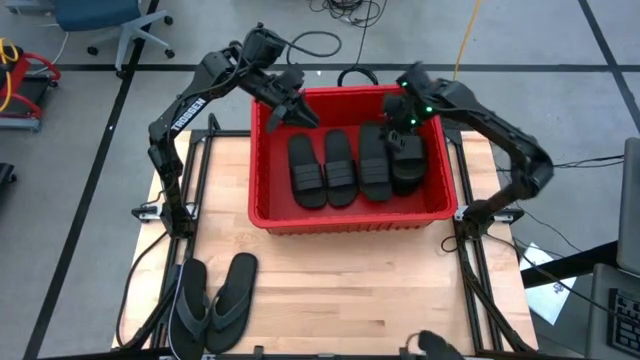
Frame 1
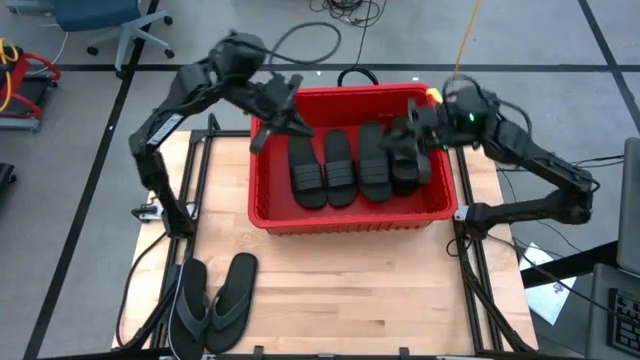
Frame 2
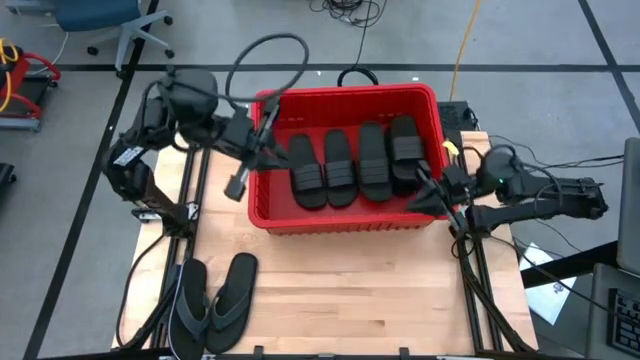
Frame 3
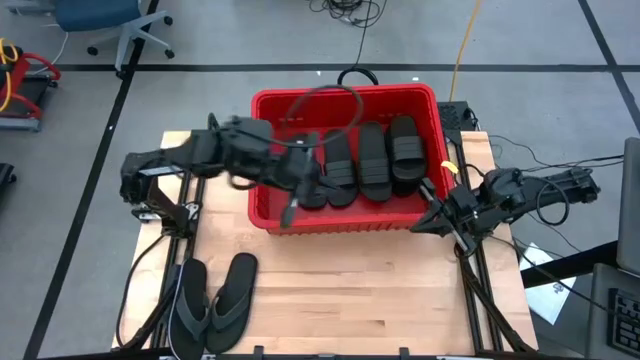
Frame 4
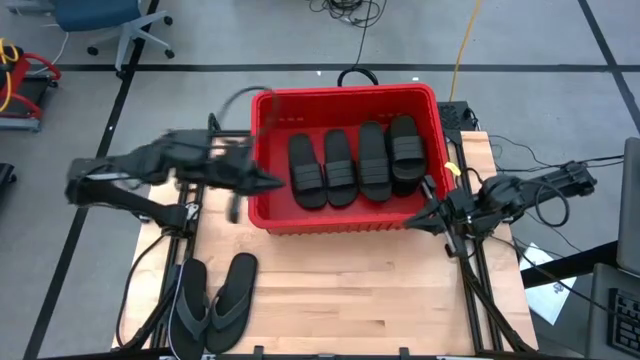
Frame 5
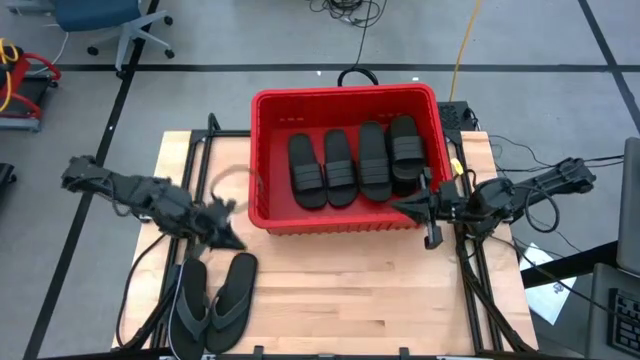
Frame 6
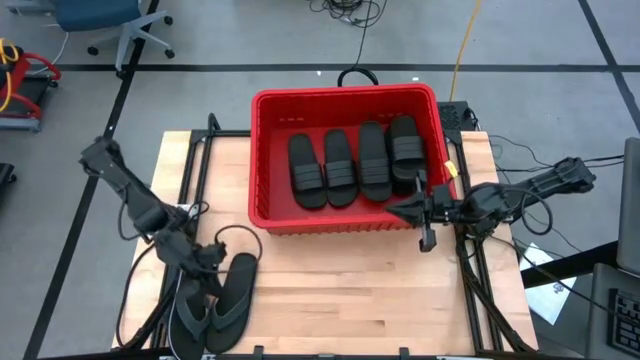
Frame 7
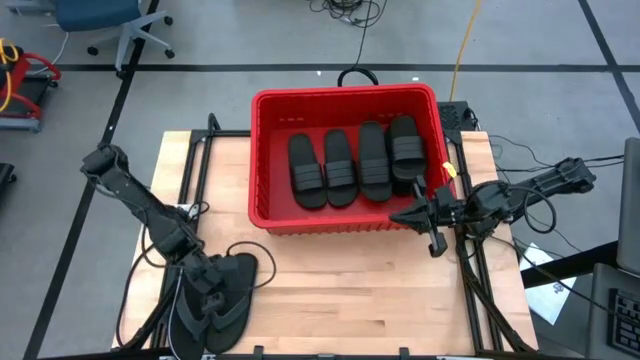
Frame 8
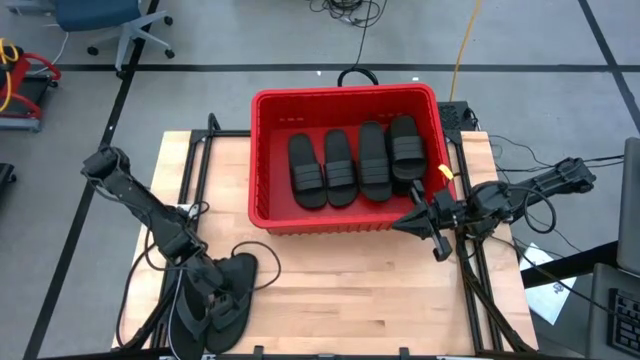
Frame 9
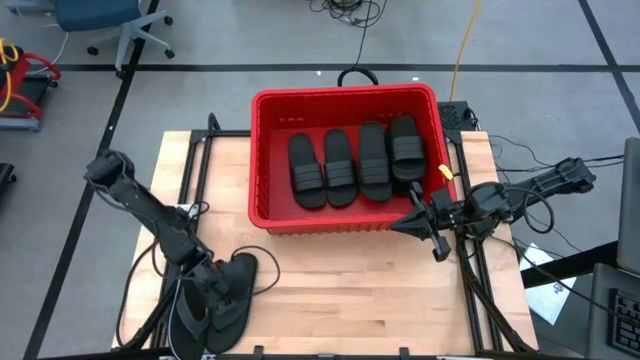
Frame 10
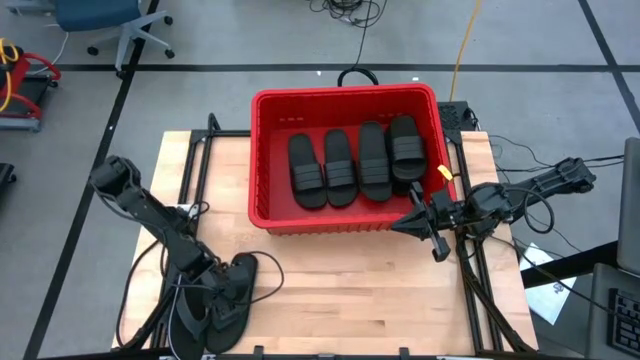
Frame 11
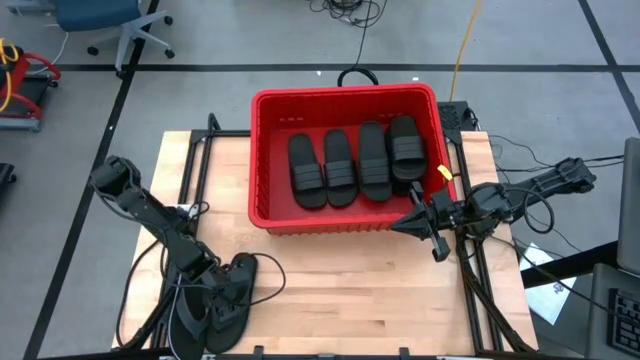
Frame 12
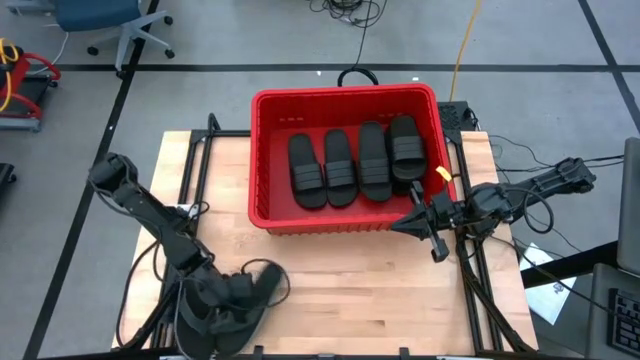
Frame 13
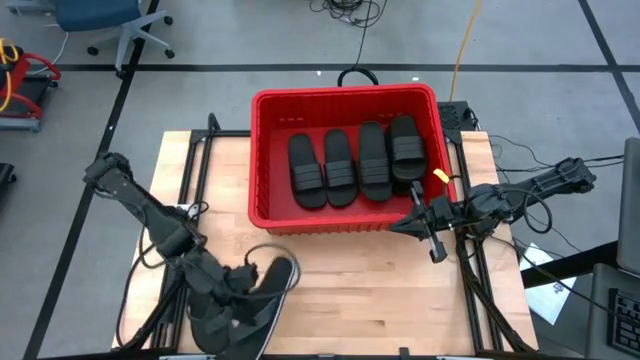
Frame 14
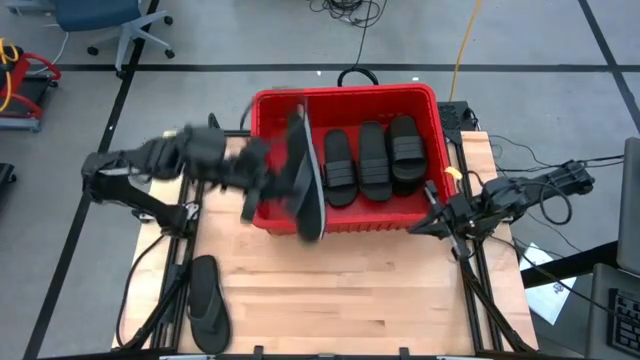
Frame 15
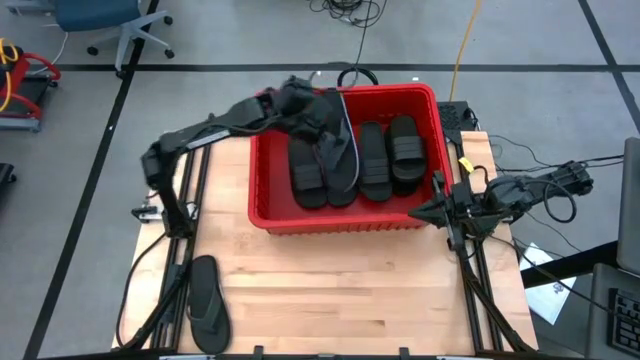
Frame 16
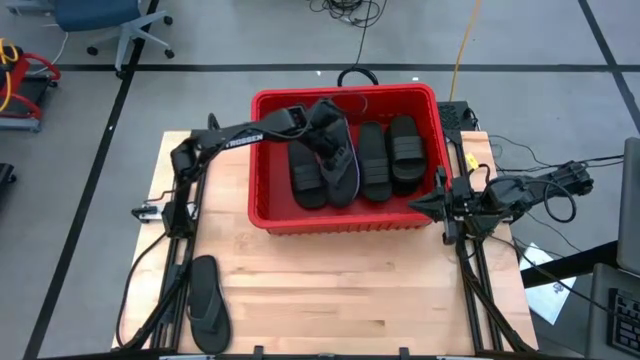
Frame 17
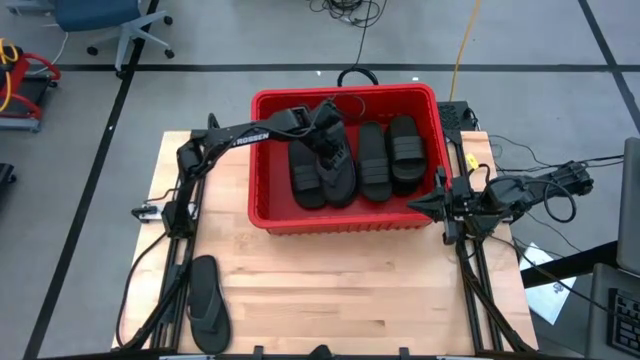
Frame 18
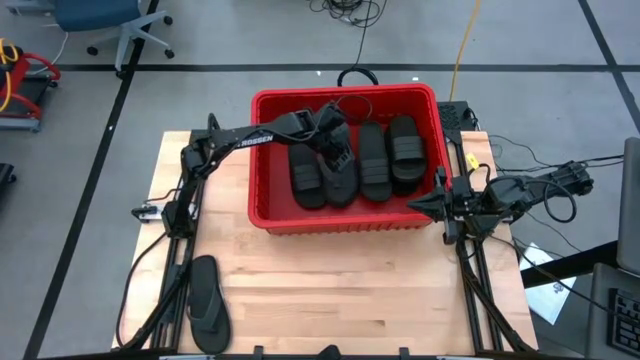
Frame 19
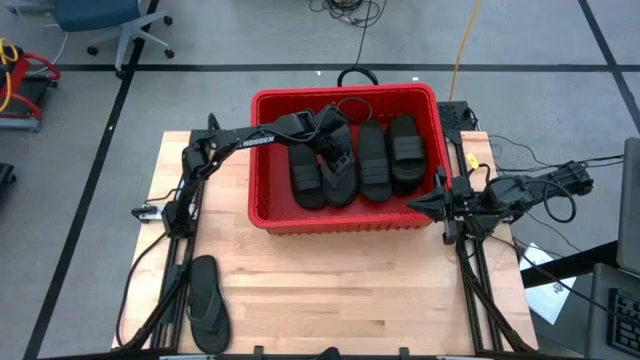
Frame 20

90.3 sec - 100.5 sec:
Task: Pick and place slides into bin
Put the right black slipper into the red bin

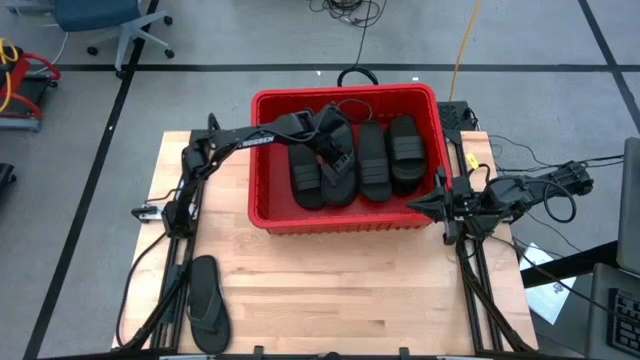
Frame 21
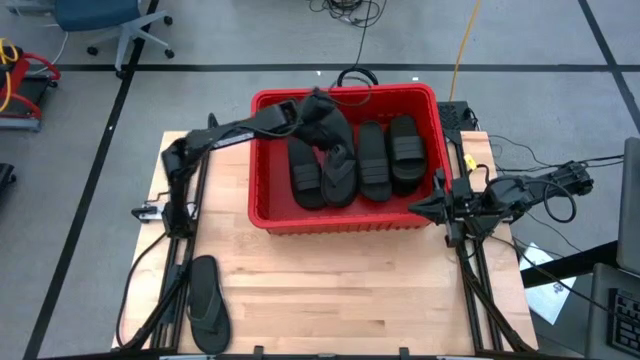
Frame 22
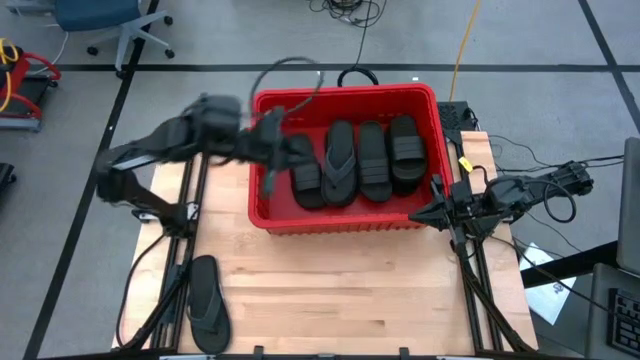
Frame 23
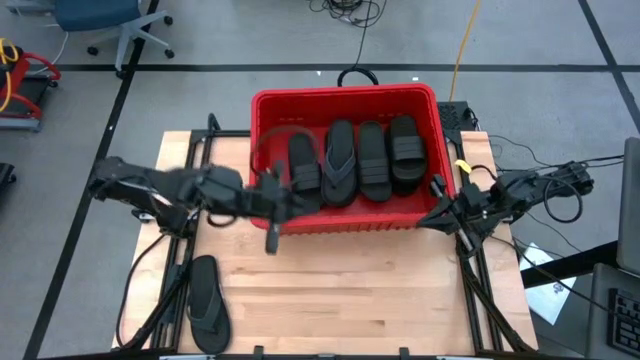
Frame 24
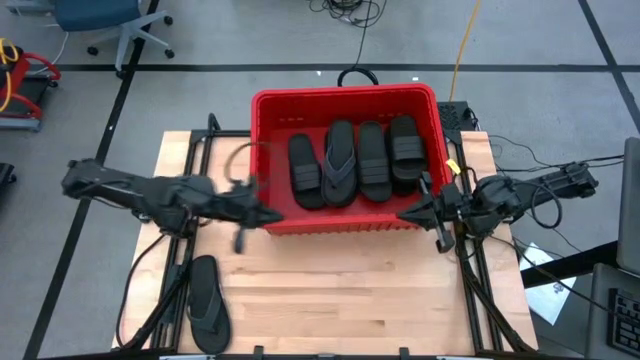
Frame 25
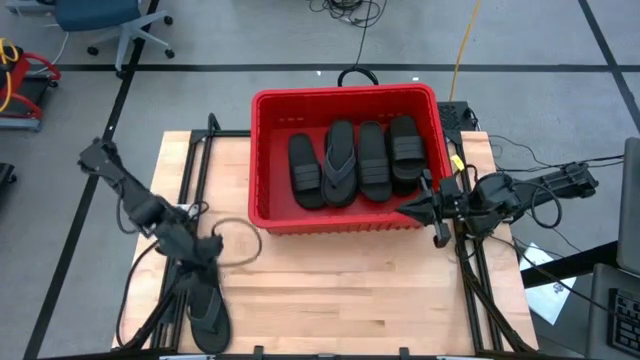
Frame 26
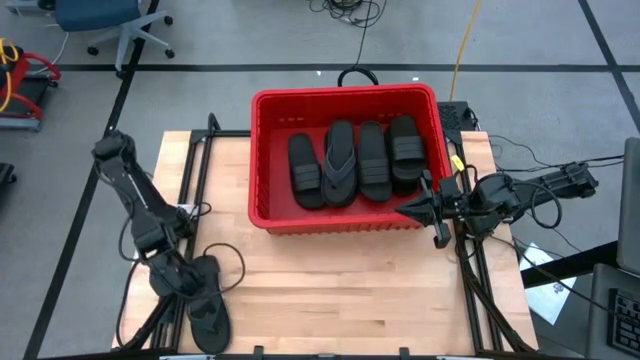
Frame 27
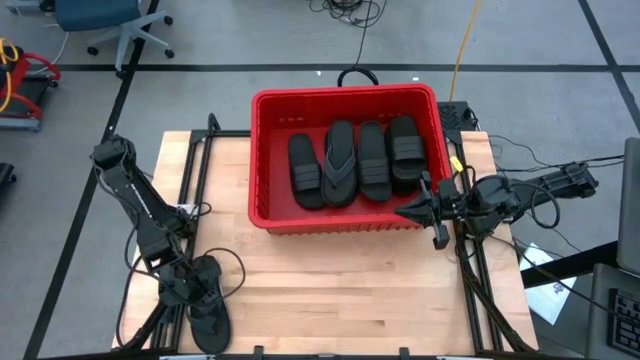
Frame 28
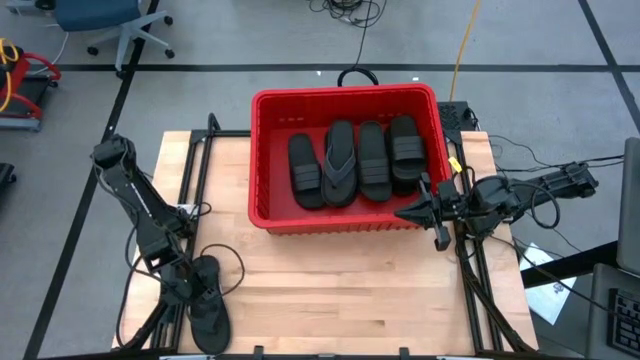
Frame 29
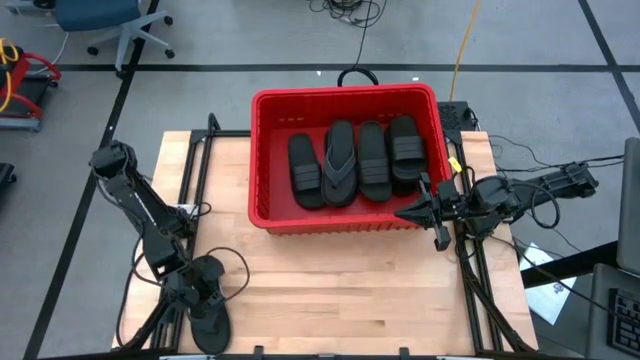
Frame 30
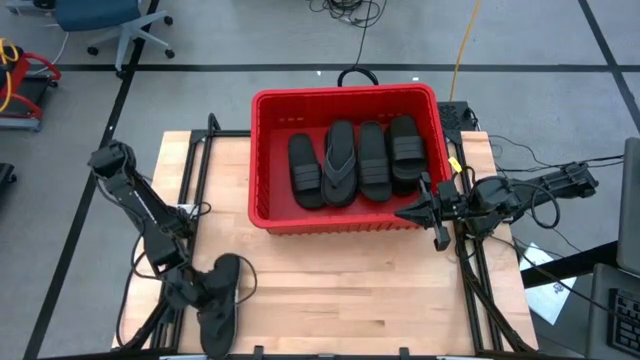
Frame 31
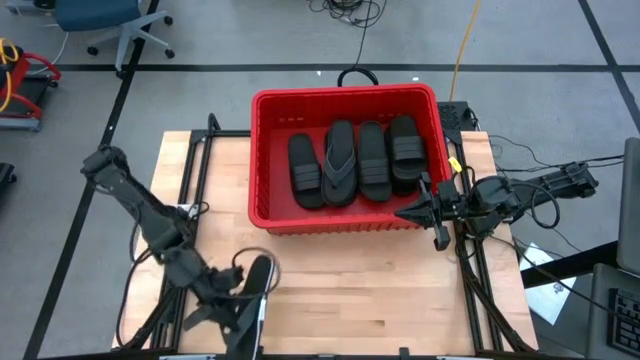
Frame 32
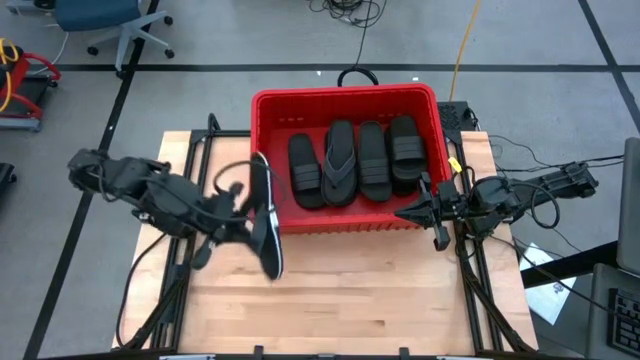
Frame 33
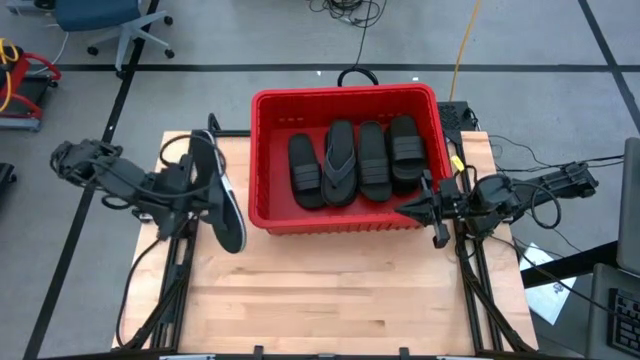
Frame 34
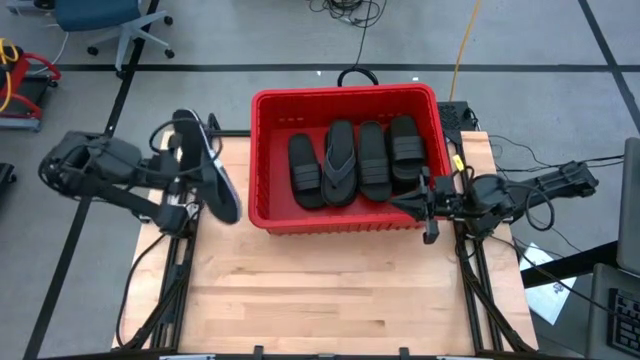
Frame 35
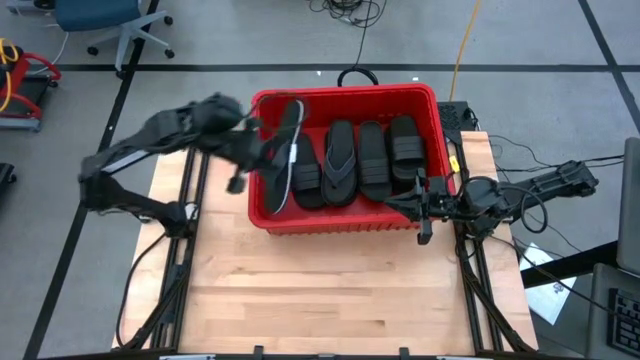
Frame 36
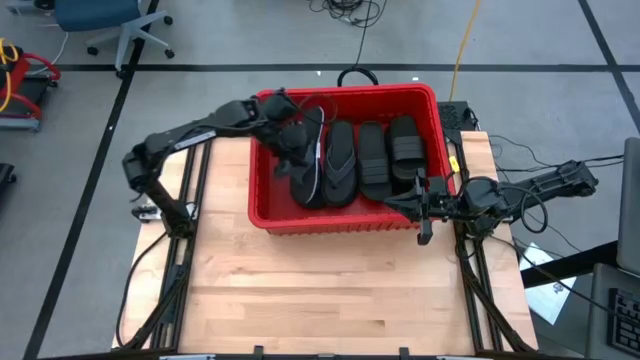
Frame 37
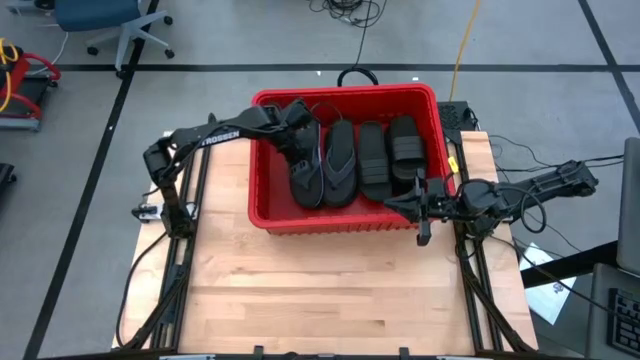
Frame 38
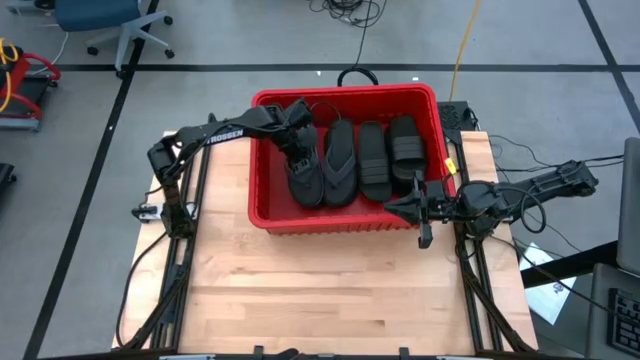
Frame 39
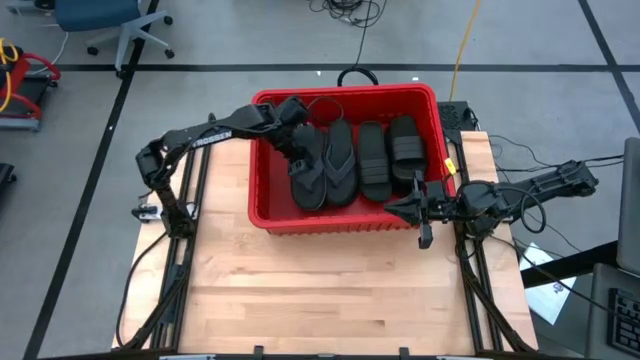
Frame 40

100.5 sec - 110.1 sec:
Put the black slipper into the red bin
